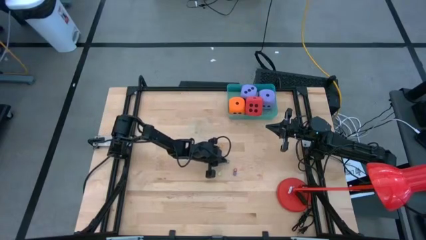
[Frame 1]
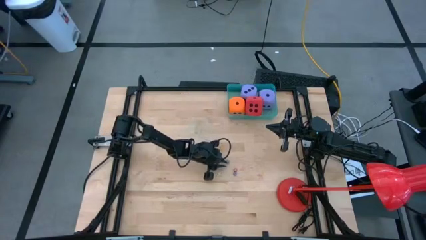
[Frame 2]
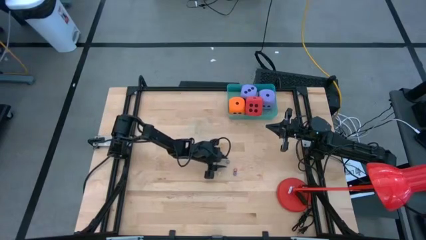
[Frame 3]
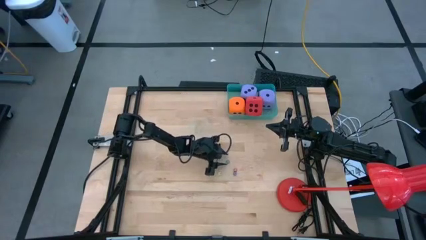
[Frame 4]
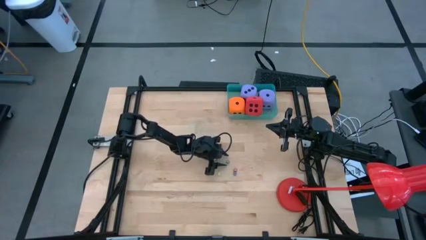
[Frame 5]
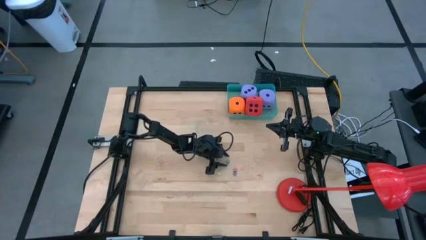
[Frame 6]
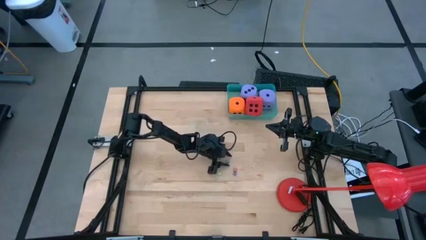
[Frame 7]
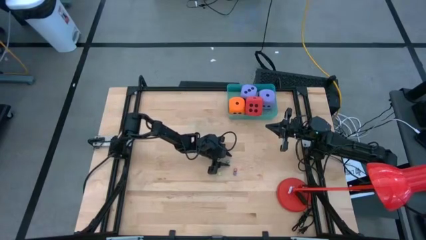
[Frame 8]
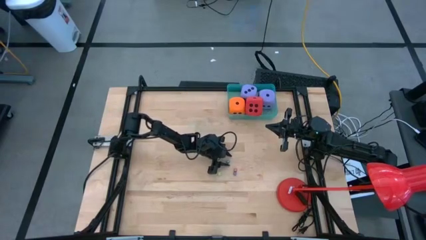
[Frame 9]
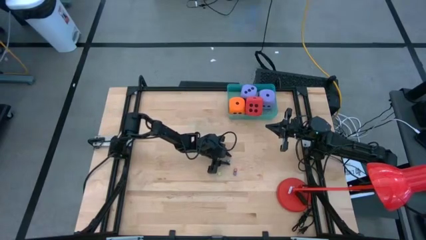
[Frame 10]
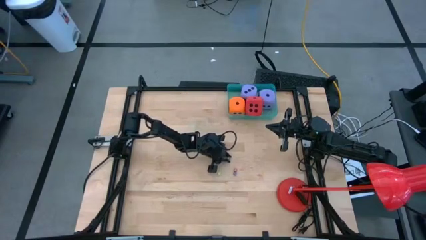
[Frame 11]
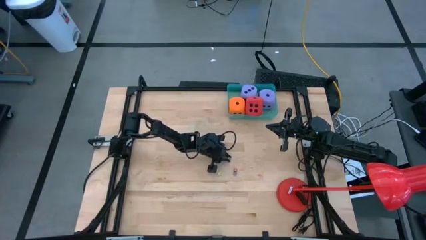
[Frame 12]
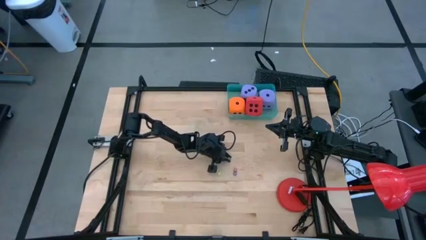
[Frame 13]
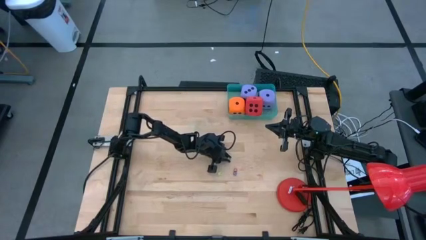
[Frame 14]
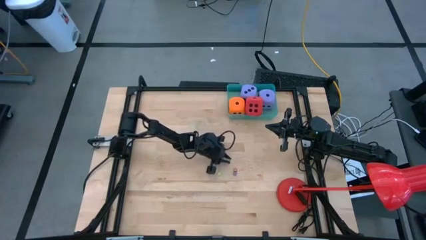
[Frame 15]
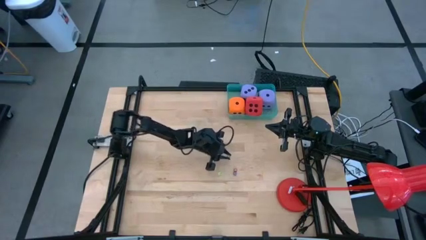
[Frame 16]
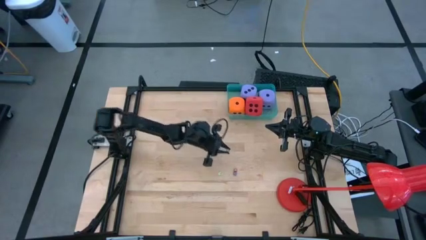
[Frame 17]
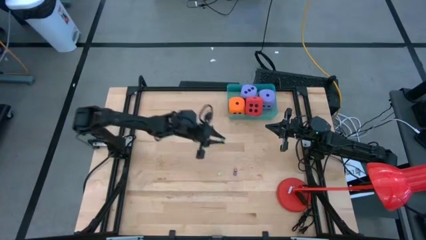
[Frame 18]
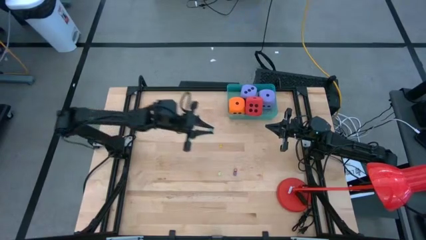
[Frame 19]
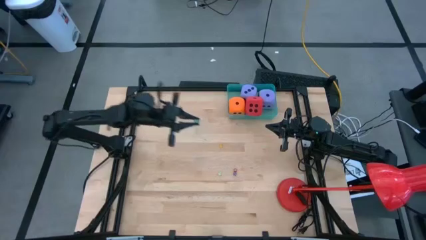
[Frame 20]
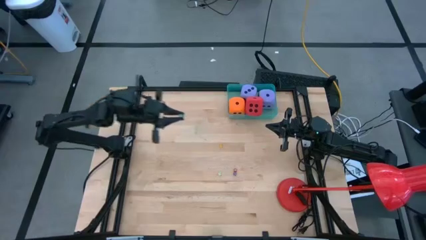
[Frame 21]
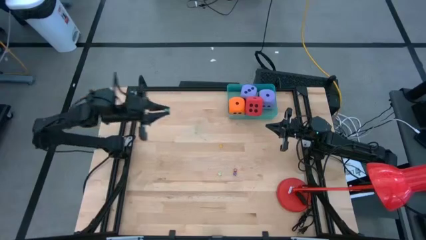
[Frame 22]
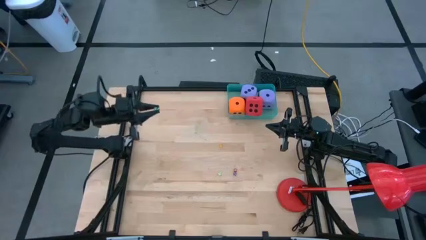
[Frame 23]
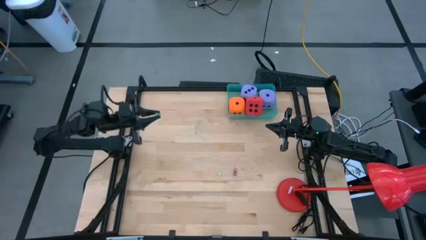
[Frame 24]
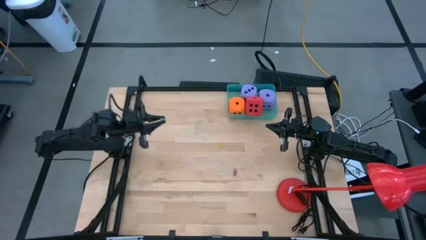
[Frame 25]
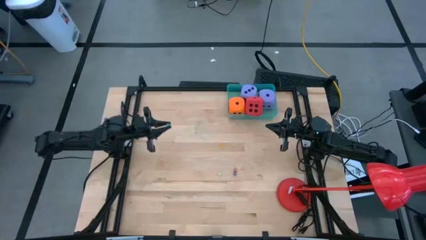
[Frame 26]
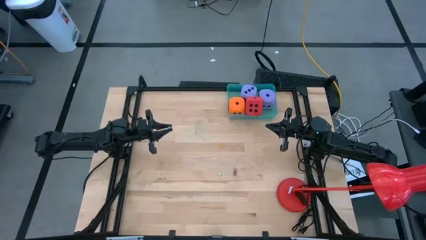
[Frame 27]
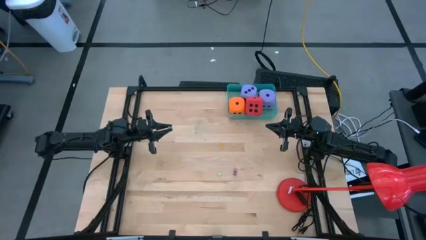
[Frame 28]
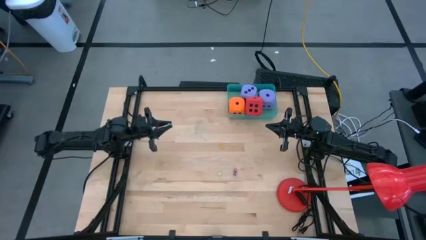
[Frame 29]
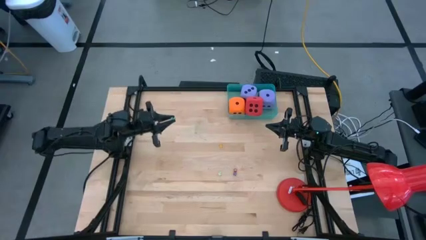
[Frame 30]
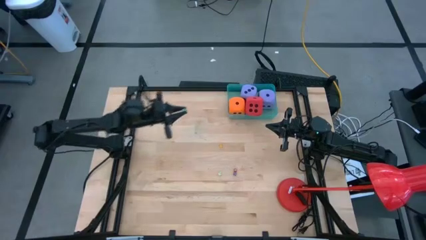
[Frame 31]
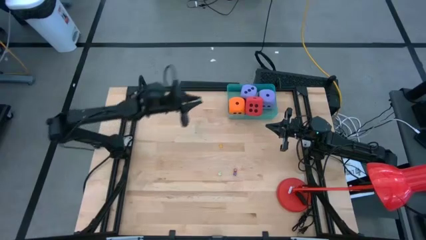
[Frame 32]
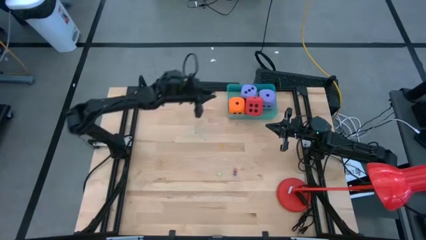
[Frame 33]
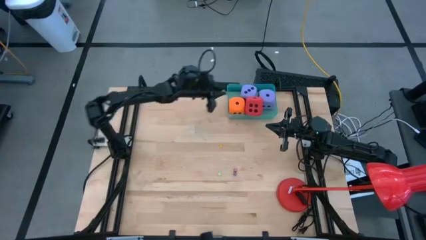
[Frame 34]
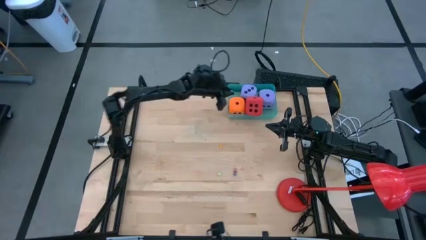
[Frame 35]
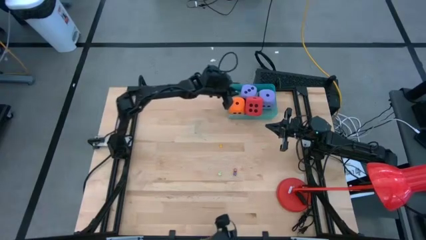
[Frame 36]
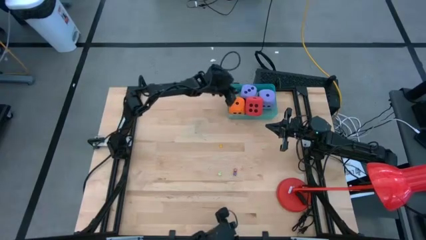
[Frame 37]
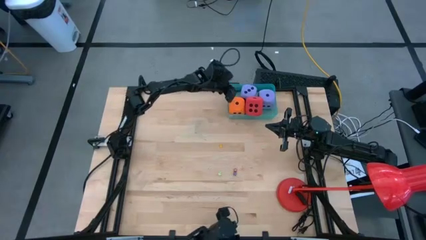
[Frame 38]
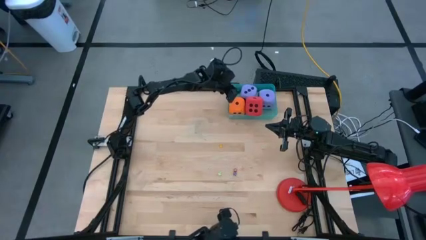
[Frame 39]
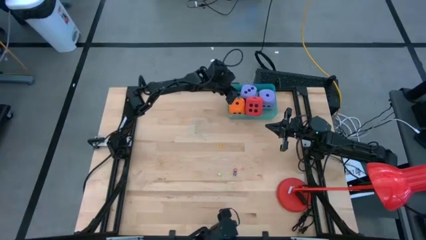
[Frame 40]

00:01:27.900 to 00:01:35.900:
Task: Pick & Place Dice
Put the small dark green dice into the blue transparent bin

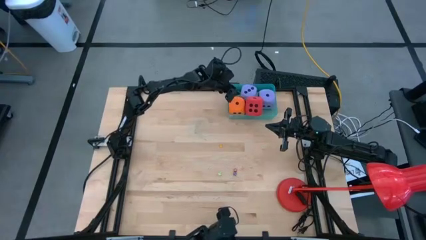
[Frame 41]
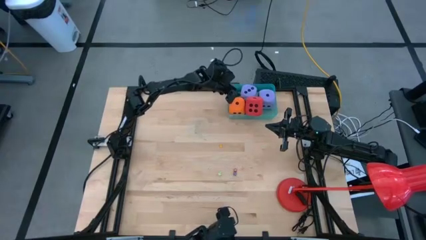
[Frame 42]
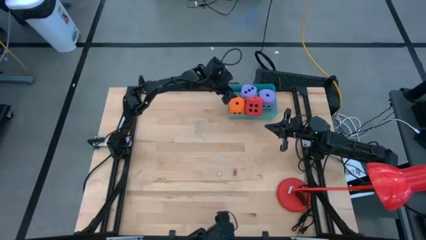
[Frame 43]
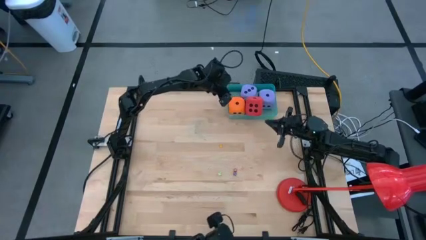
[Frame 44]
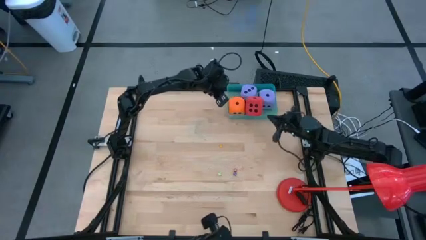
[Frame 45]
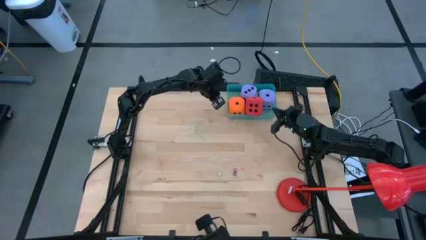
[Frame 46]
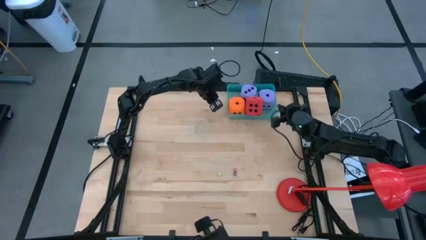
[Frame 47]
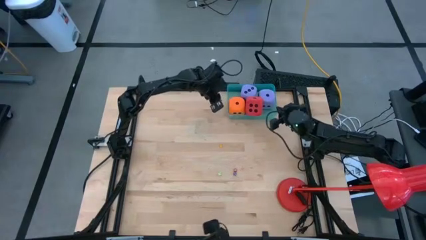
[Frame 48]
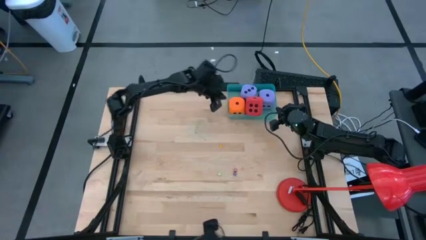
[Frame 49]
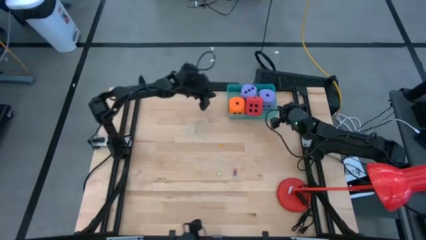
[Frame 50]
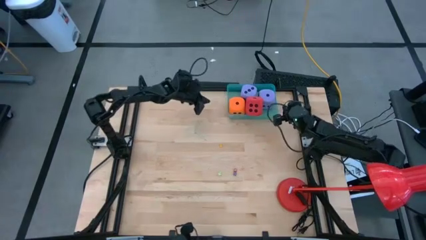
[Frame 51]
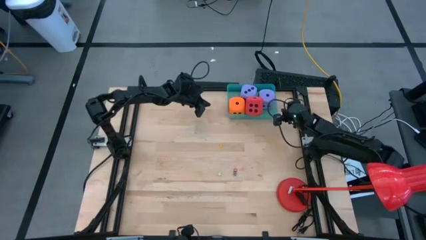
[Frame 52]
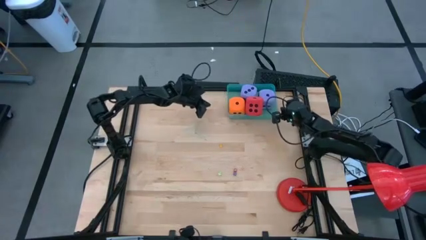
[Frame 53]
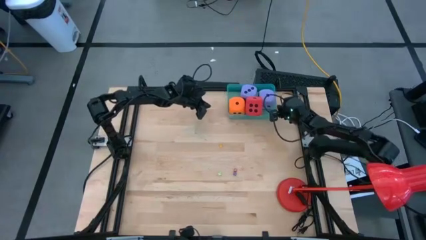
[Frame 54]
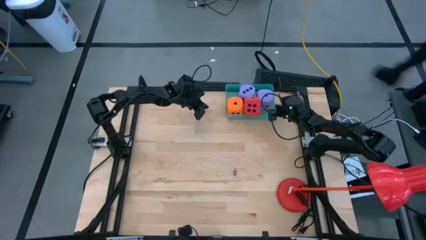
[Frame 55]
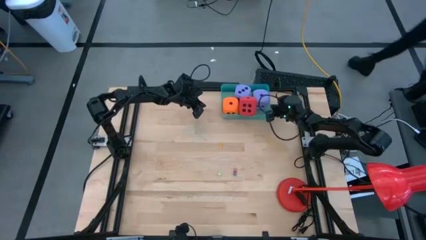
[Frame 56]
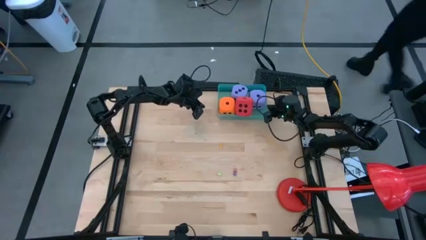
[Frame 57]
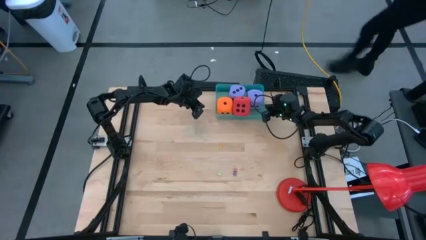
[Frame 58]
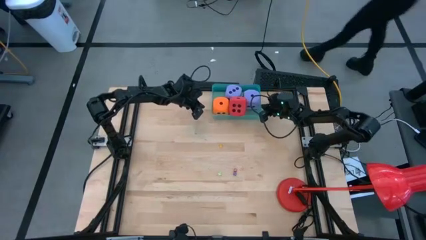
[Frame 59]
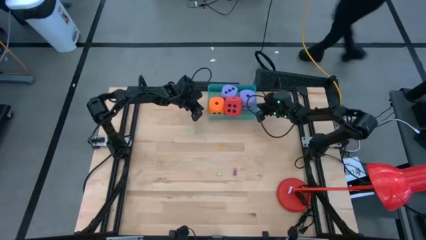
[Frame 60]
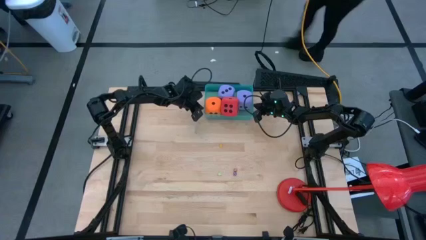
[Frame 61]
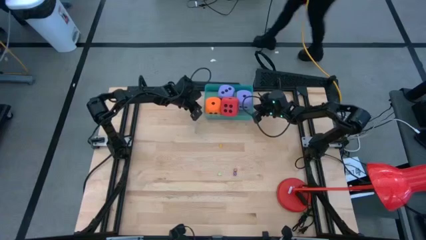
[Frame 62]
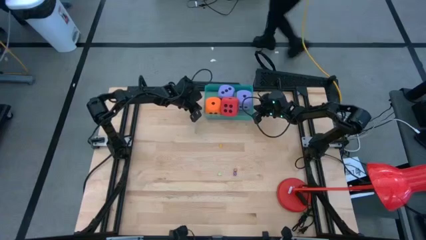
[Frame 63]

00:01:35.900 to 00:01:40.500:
Adjust the blue transparent bin

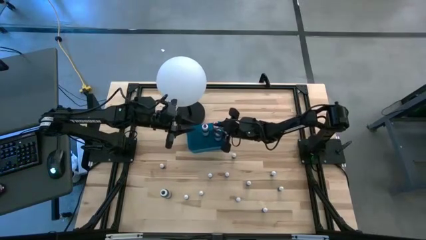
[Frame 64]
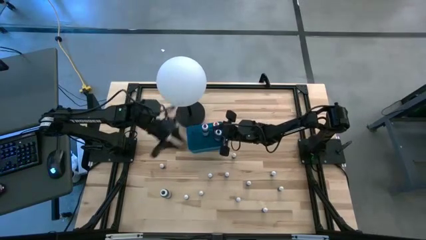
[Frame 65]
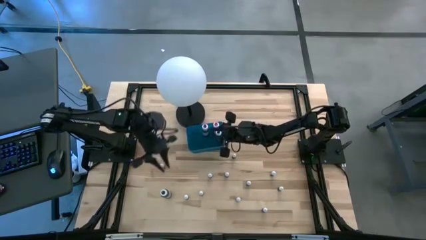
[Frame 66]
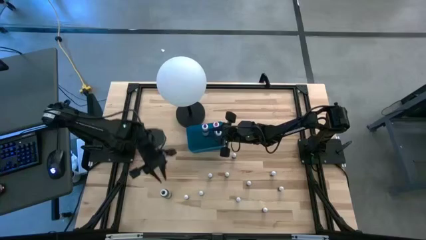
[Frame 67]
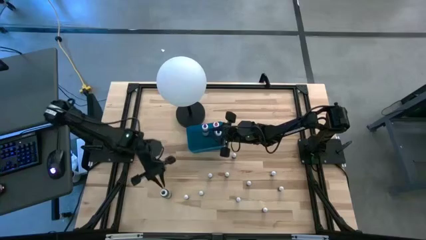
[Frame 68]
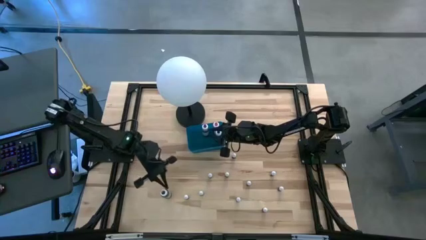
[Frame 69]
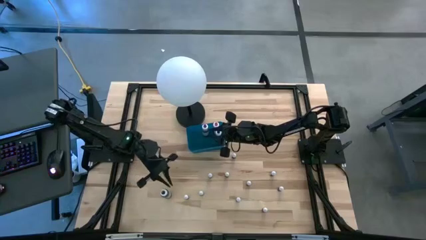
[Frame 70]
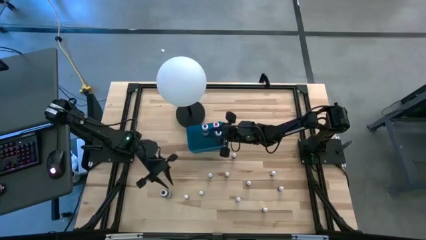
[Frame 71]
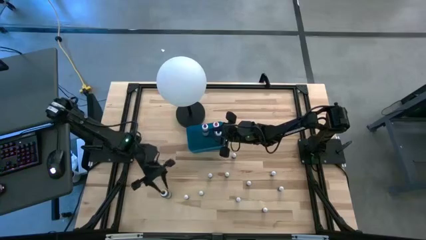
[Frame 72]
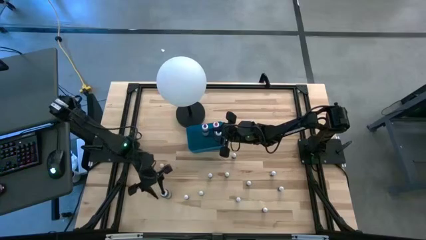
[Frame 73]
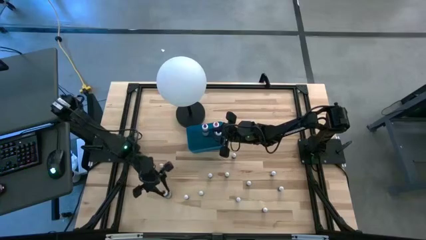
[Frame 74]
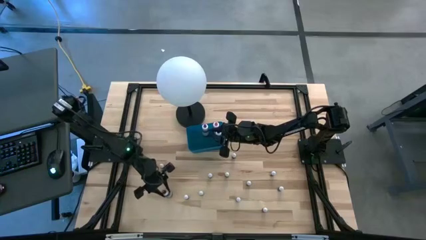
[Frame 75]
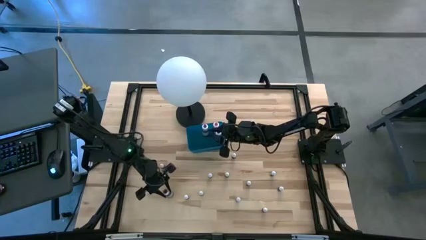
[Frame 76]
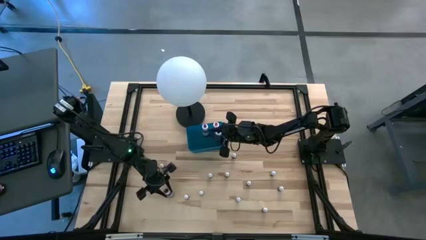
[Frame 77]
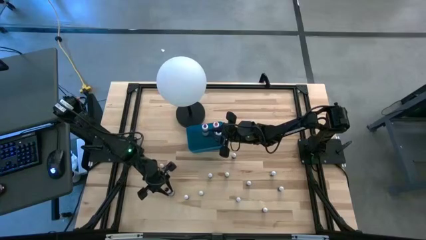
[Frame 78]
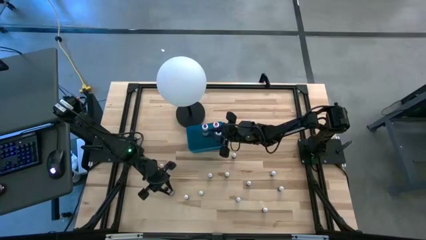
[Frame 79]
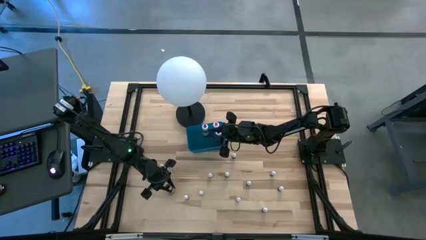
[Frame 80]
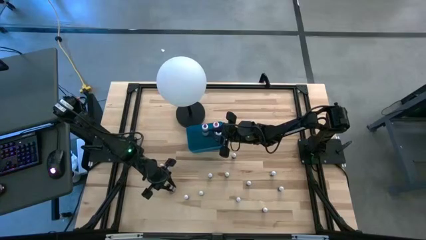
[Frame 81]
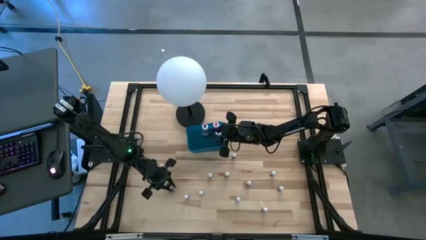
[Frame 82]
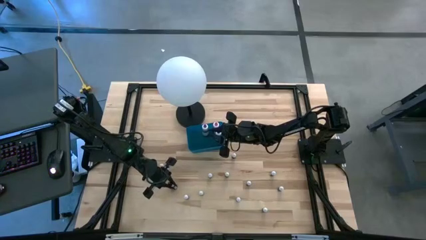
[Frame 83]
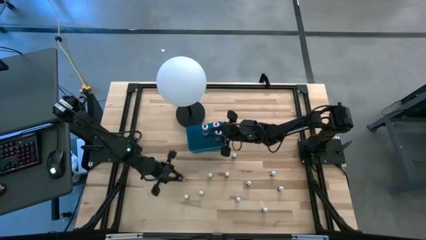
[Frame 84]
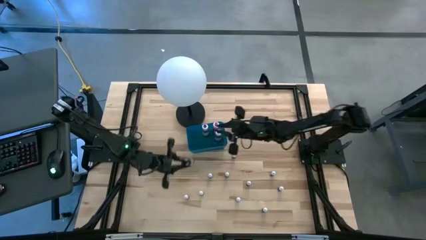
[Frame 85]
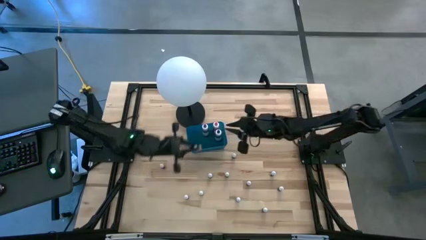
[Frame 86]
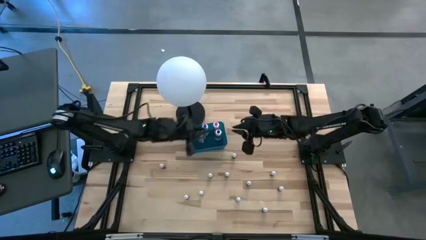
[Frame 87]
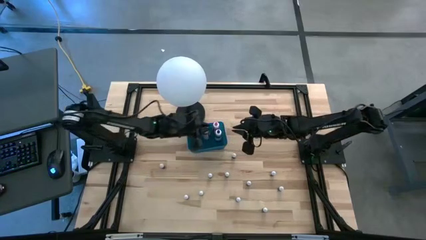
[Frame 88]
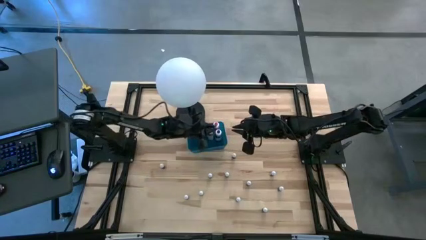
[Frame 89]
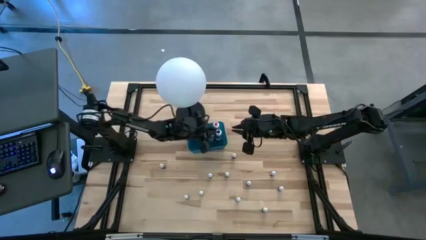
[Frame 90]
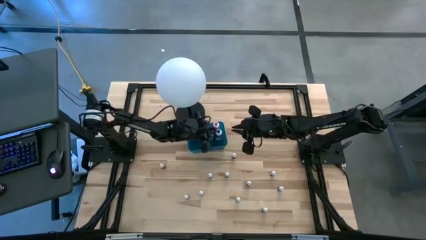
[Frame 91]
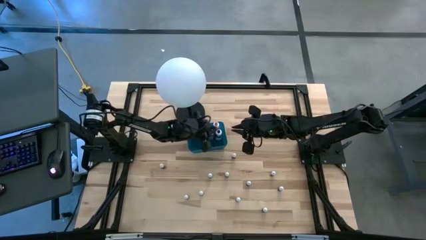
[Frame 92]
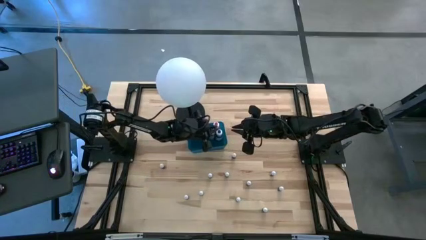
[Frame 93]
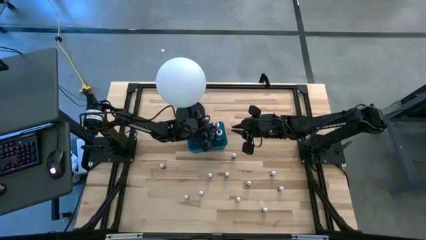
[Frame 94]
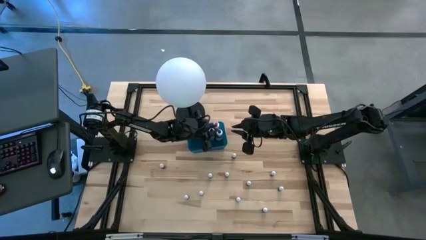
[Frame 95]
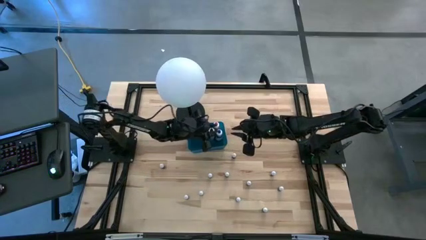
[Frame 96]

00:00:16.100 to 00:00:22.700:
Task: Pick & Place food coloring
Put the large black food coloring bottle into the blue container
